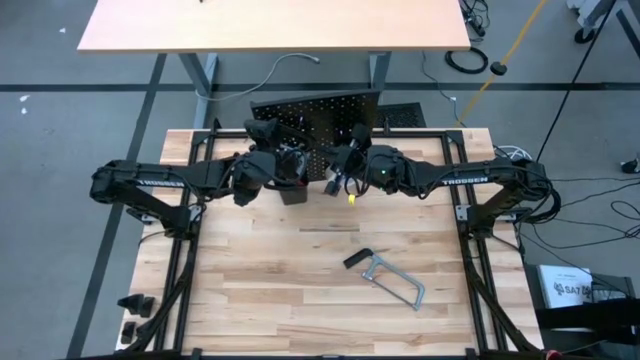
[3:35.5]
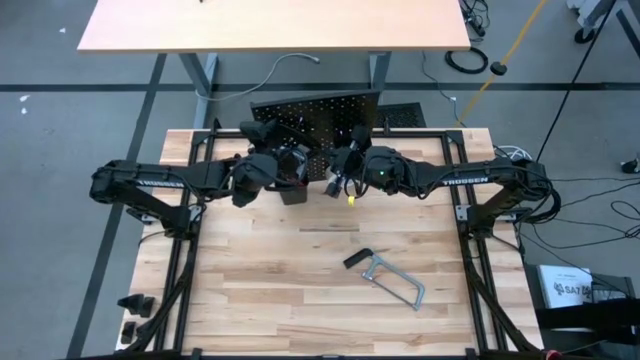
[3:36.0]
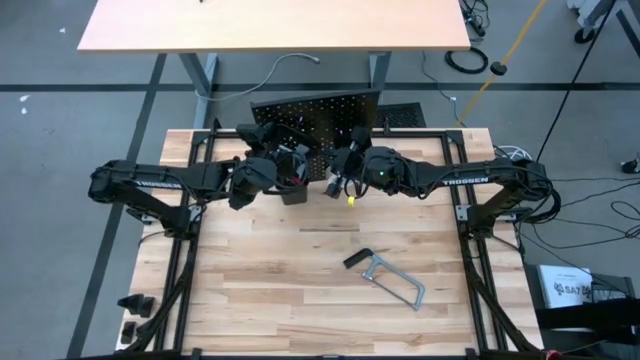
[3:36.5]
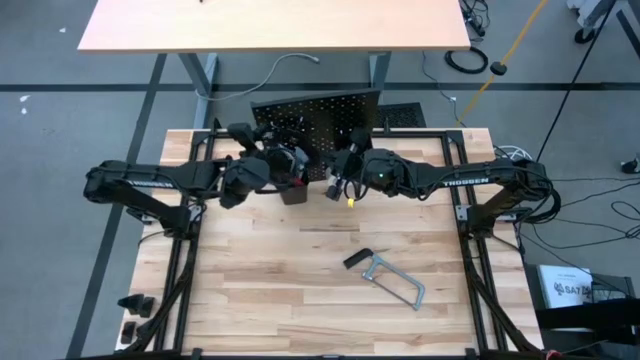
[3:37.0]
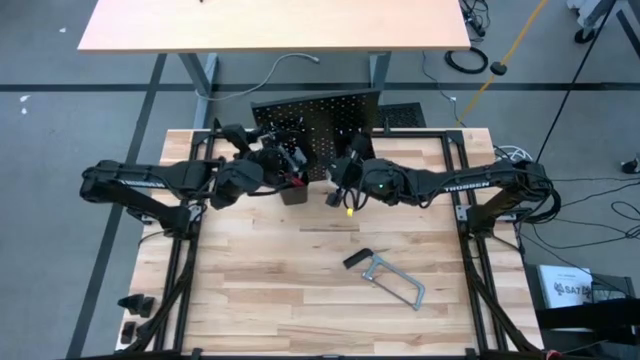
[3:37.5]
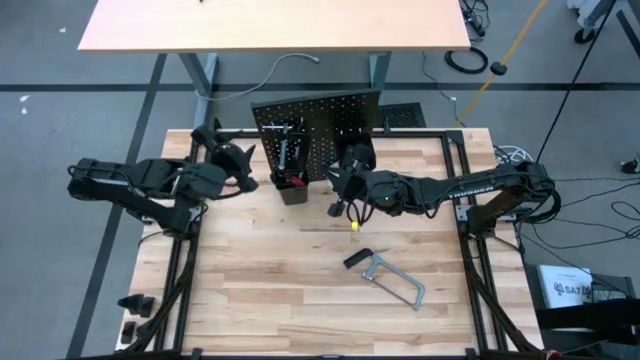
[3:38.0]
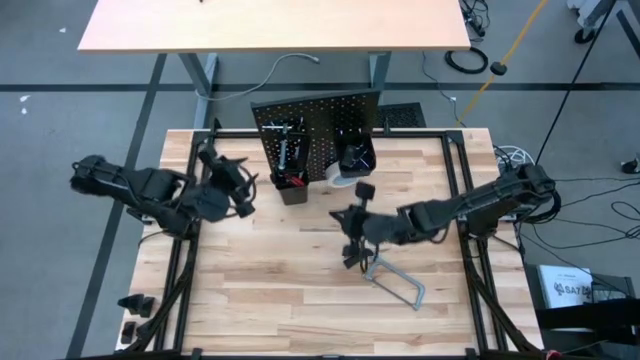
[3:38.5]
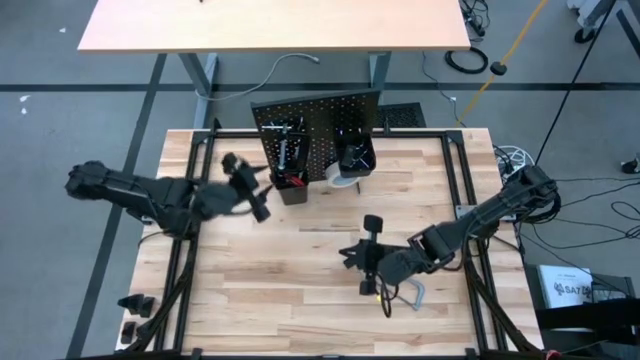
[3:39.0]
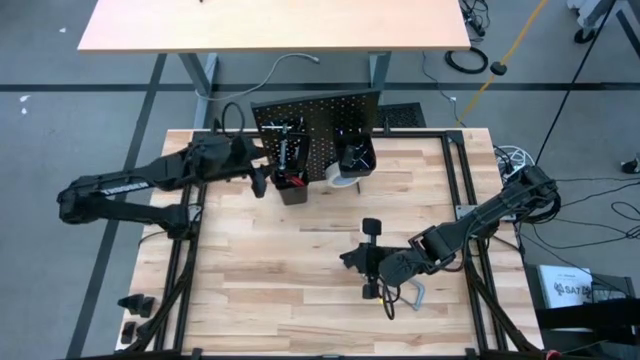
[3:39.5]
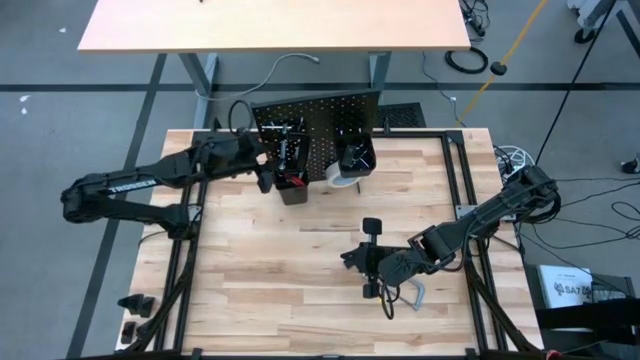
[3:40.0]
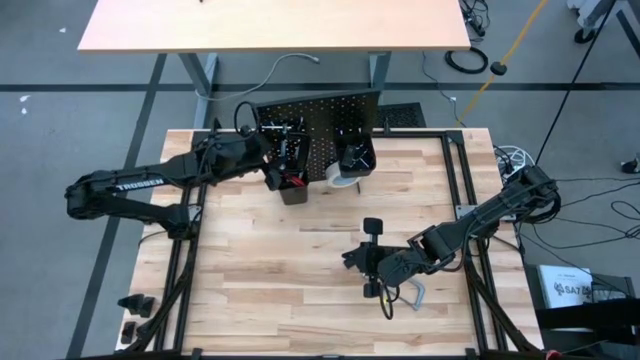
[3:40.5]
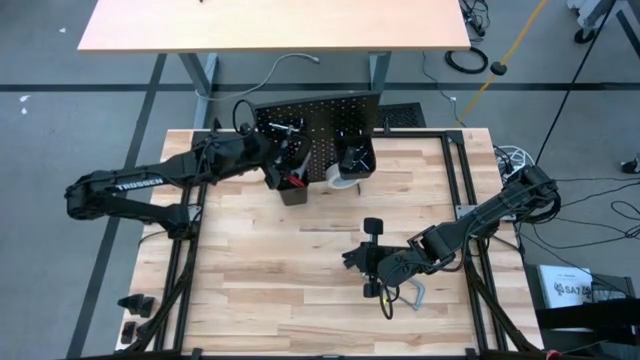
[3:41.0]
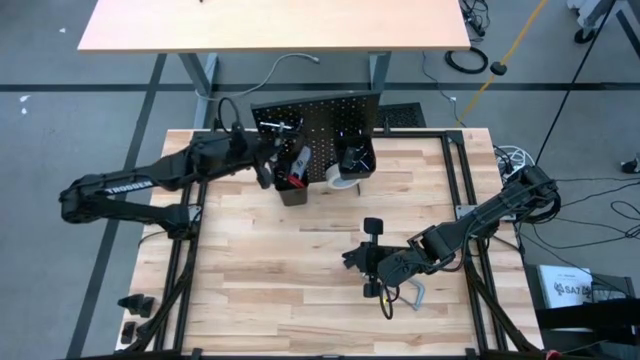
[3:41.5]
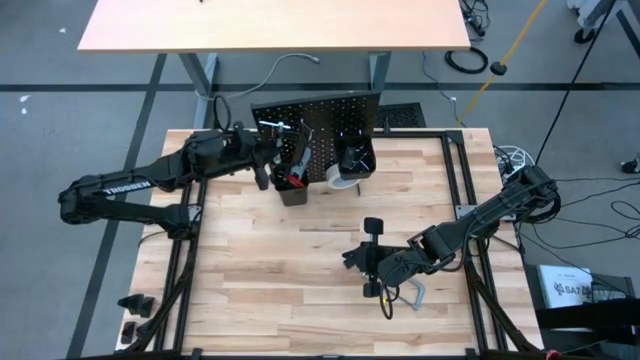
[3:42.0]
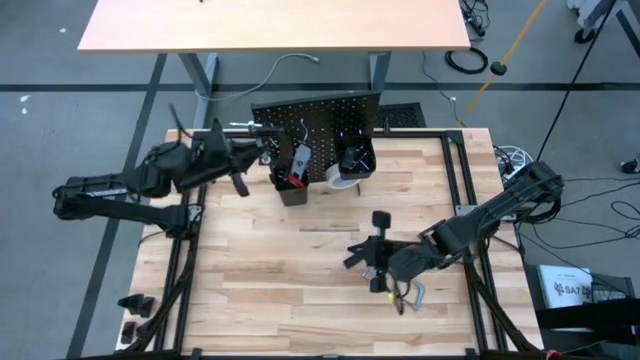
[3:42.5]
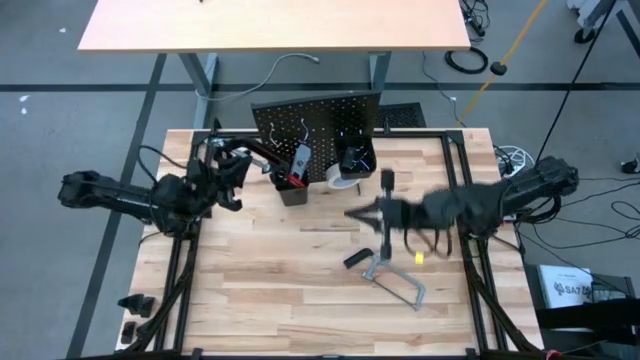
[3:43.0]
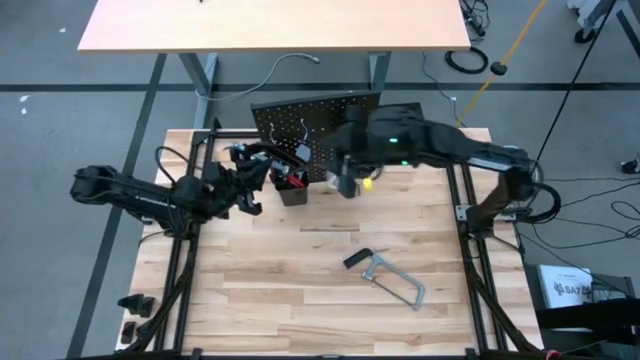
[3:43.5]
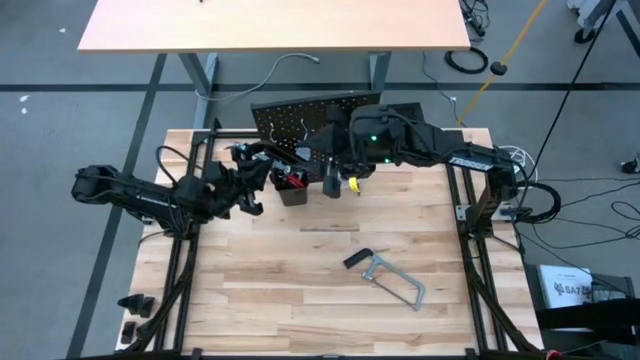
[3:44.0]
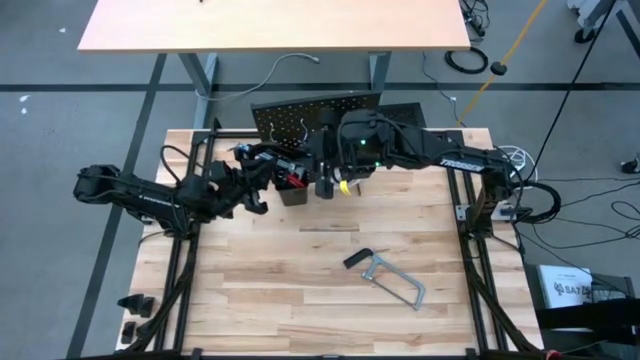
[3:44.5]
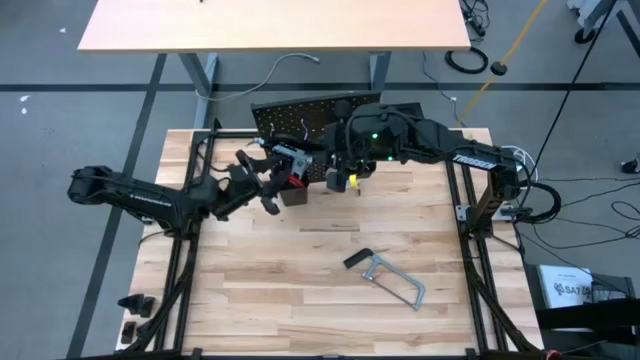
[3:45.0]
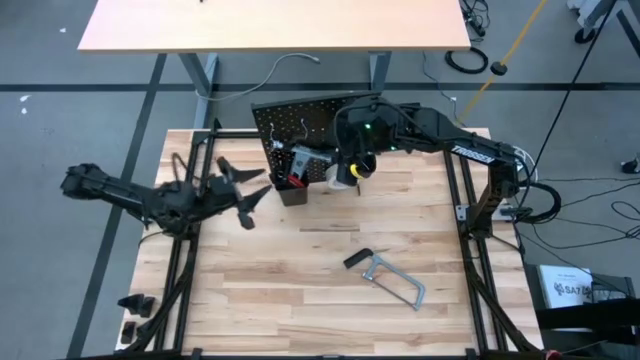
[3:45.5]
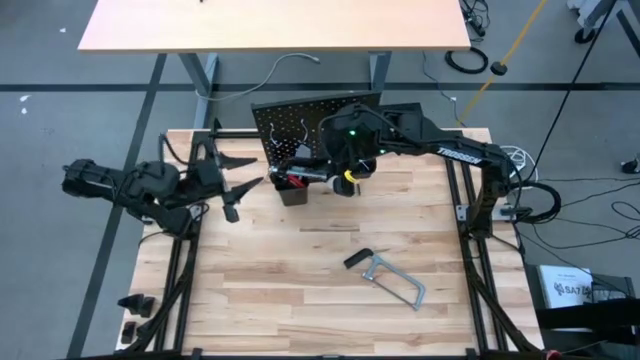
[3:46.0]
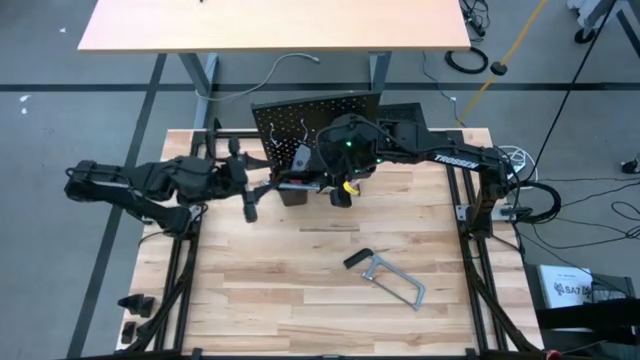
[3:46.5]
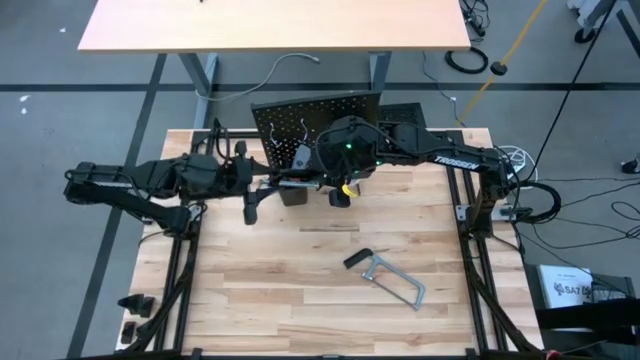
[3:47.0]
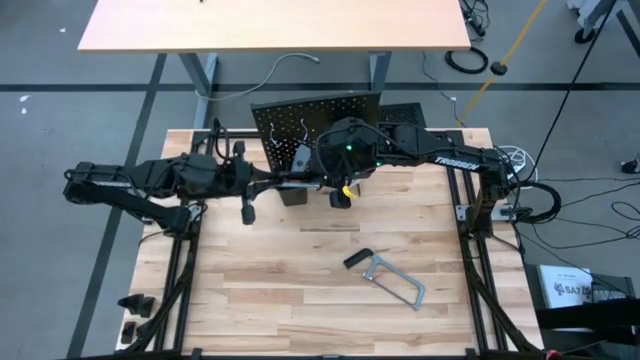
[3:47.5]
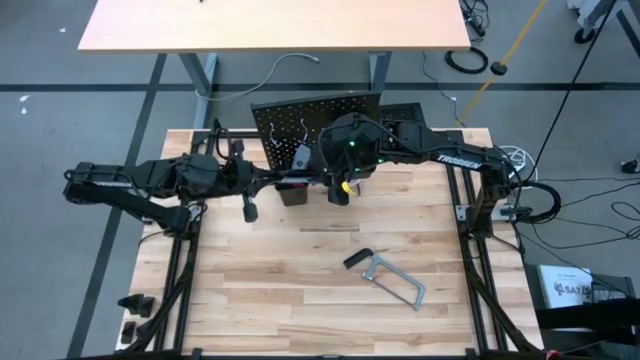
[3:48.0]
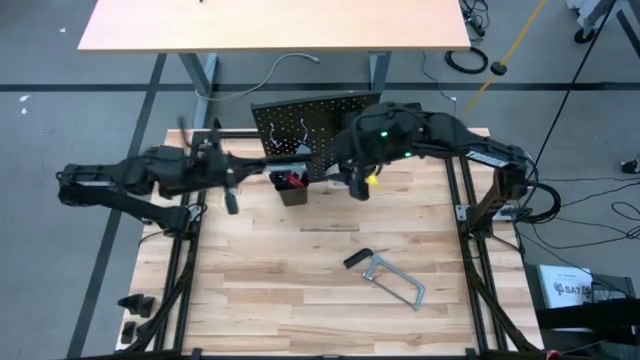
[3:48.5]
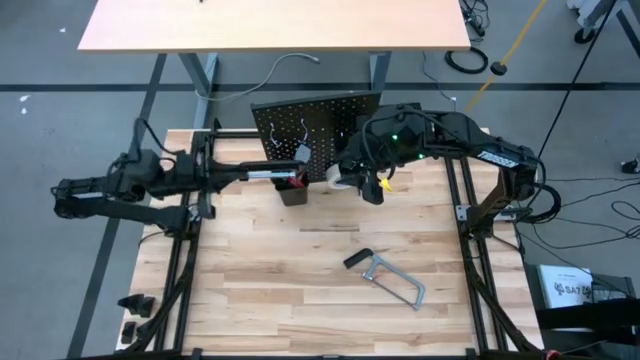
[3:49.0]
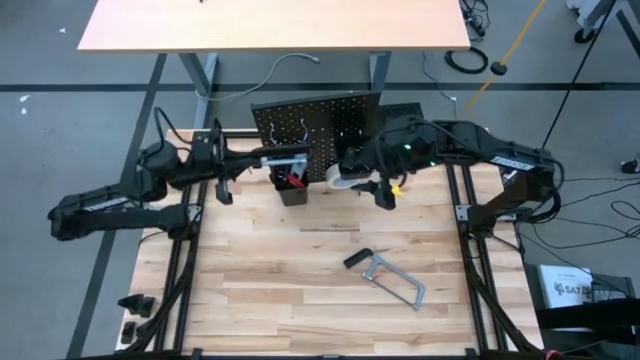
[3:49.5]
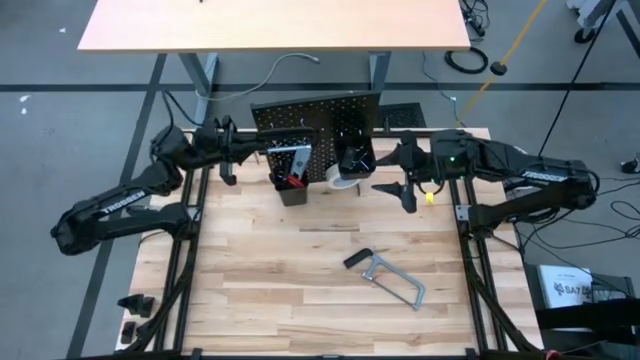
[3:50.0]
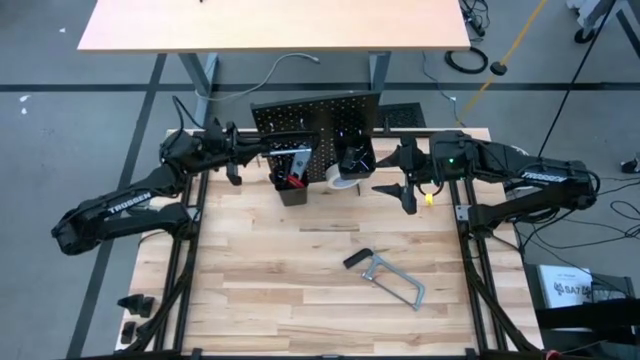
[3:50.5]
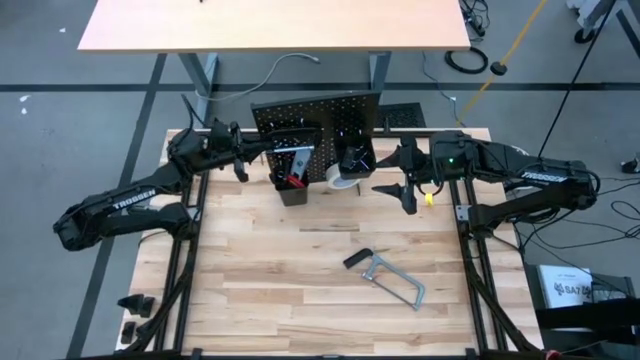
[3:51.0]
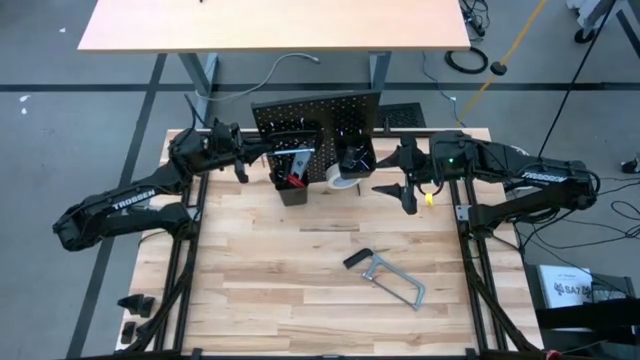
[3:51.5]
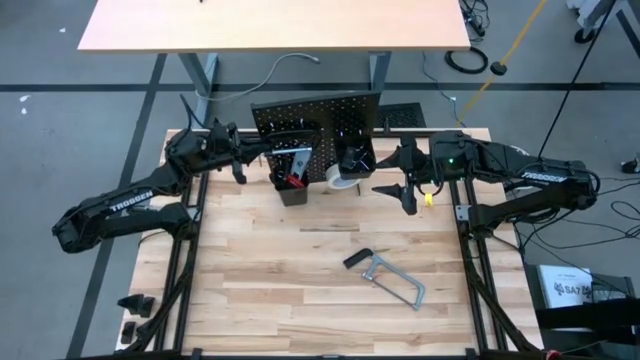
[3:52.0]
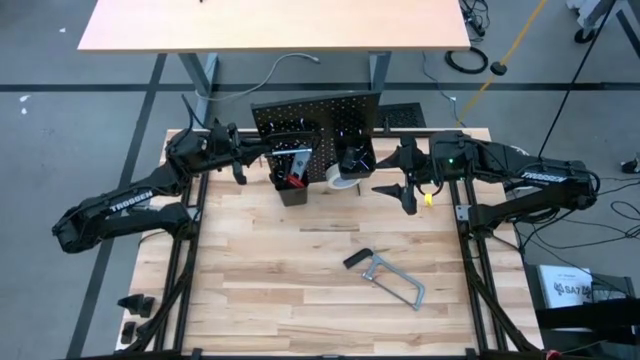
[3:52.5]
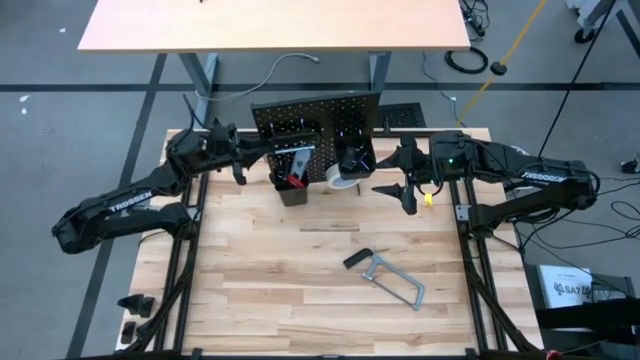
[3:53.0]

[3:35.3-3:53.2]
Task: Hang tools onto peg board
Hang the clamp on the pegboard

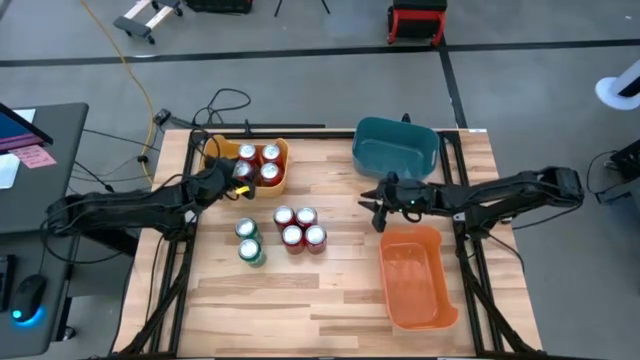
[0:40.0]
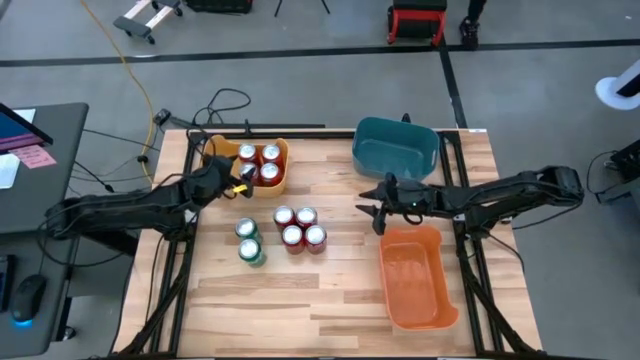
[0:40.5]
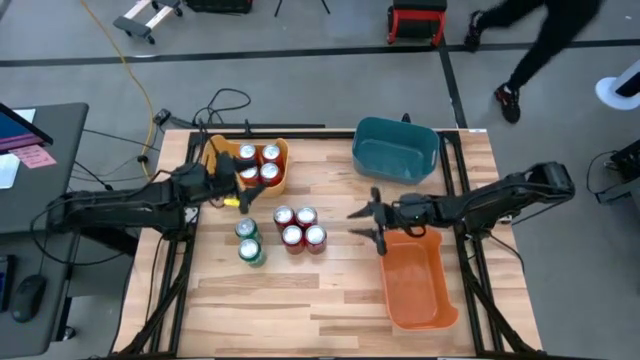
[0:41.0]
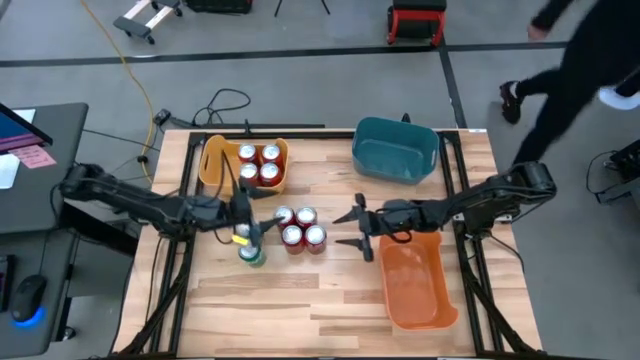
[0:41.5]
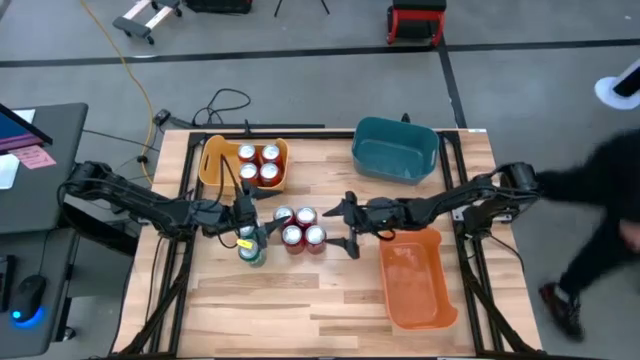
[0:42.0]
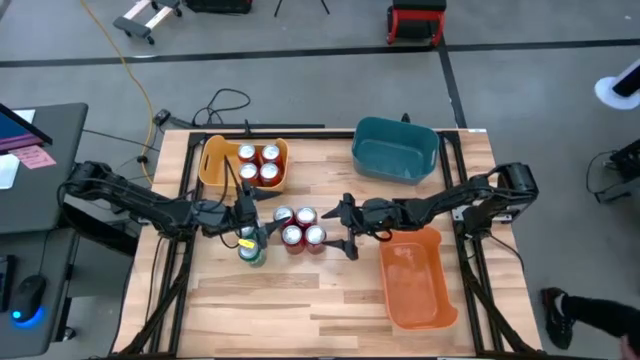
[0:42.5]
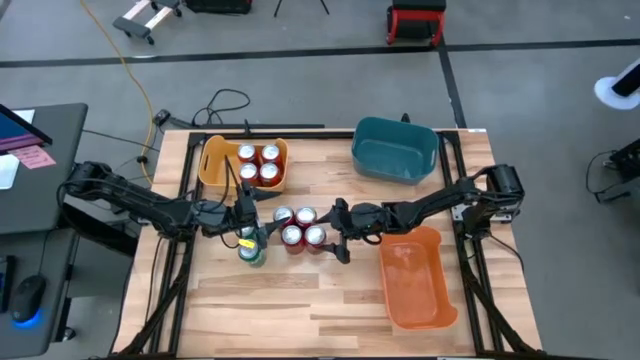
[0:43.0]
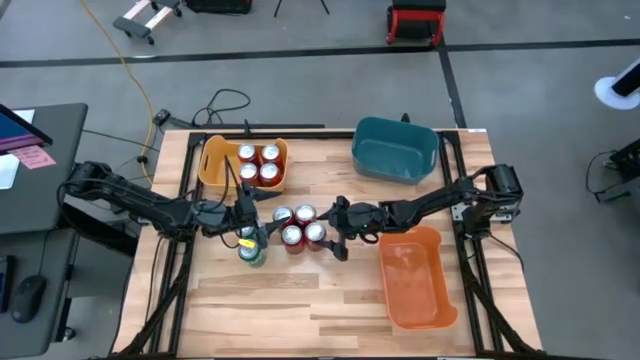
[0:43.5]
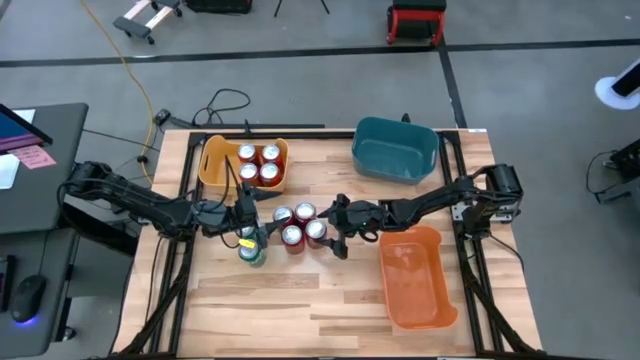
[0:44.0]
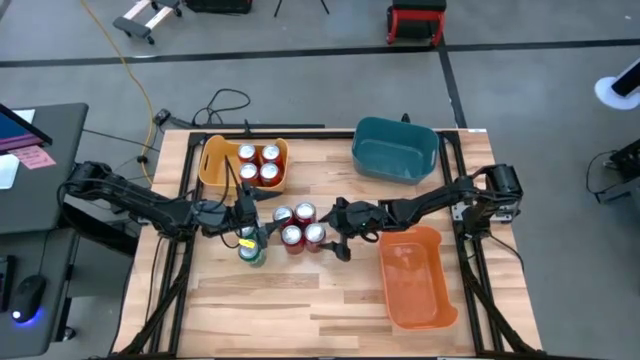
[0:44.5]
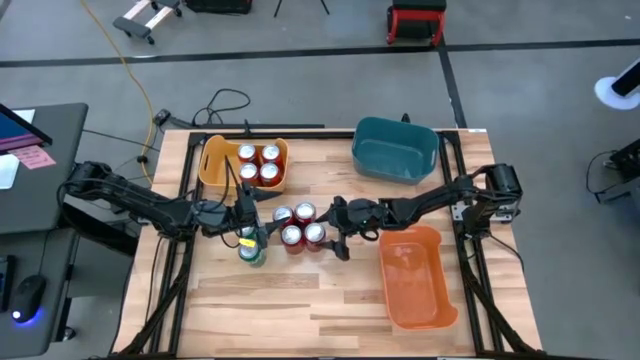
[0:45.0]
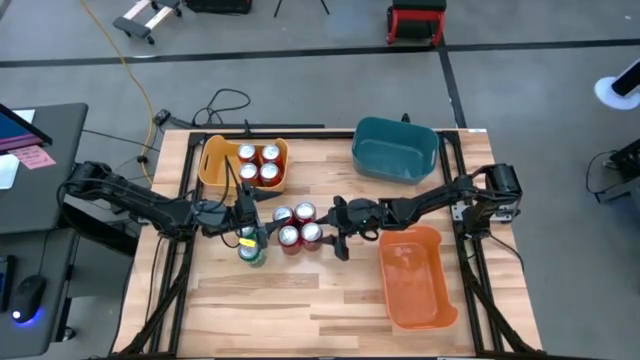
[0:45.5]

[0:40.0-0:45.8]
Task: Sort soda cans
Put the bottom right red soda can into the blue bin
